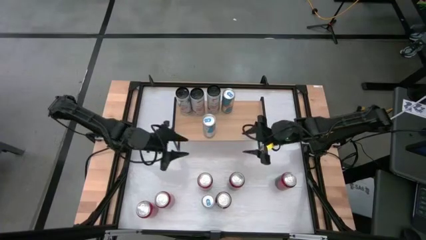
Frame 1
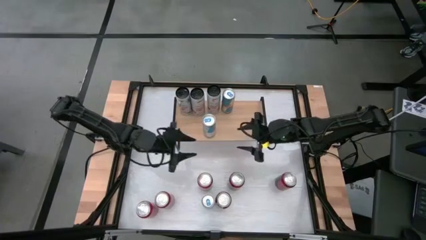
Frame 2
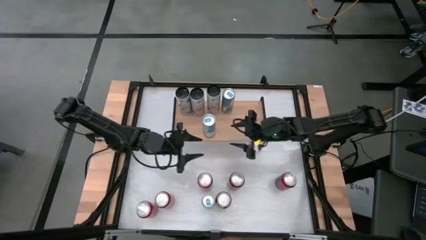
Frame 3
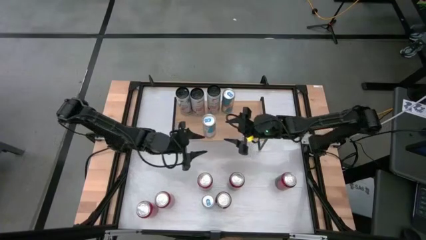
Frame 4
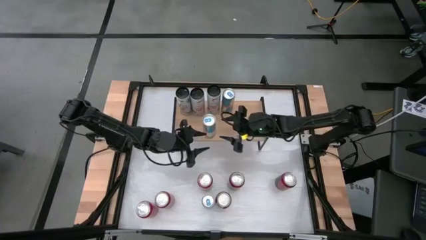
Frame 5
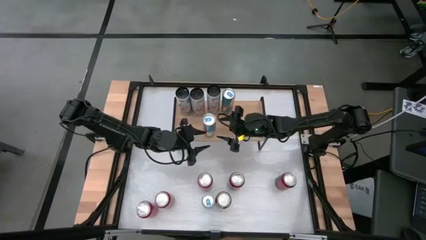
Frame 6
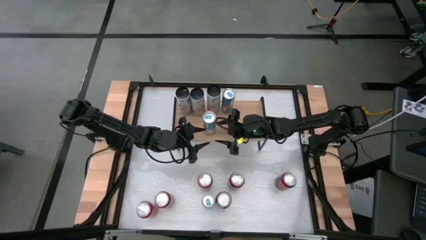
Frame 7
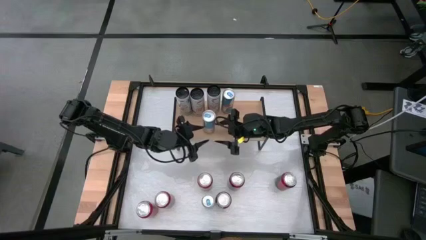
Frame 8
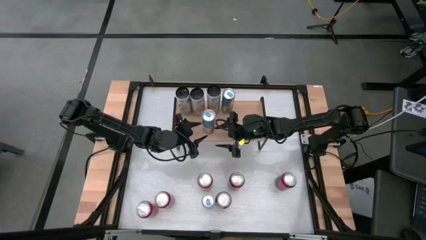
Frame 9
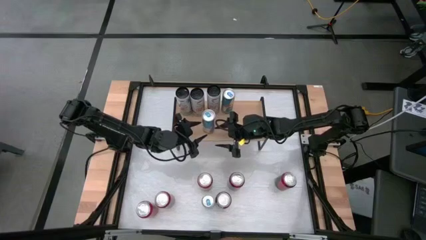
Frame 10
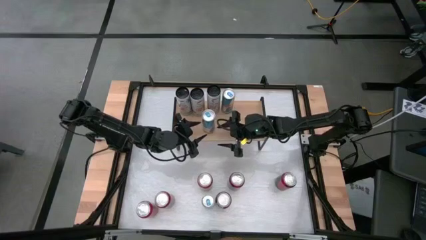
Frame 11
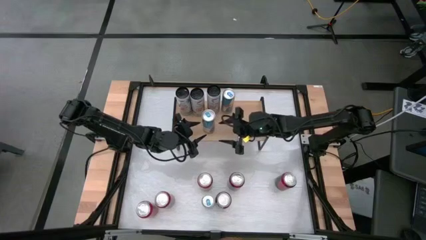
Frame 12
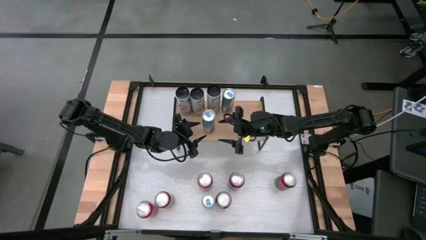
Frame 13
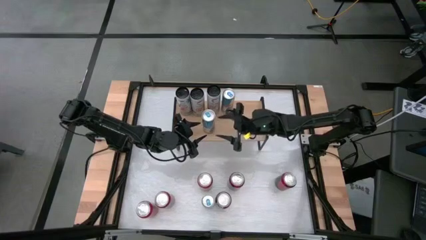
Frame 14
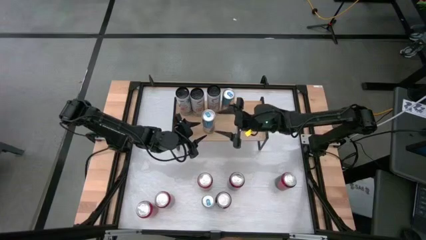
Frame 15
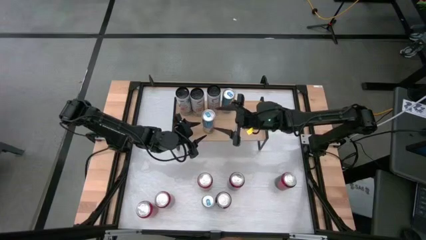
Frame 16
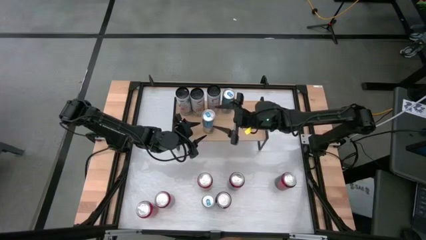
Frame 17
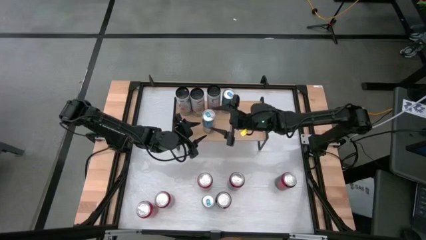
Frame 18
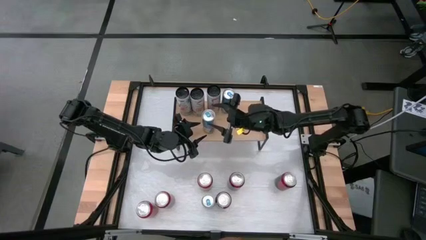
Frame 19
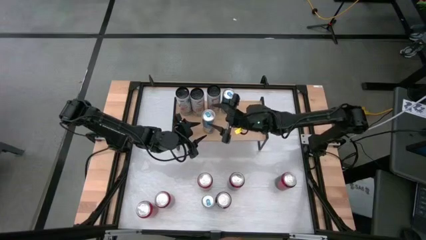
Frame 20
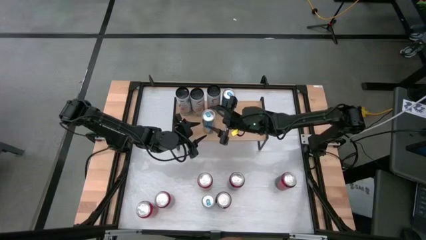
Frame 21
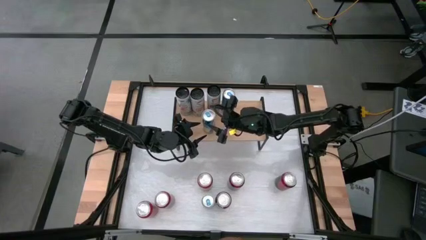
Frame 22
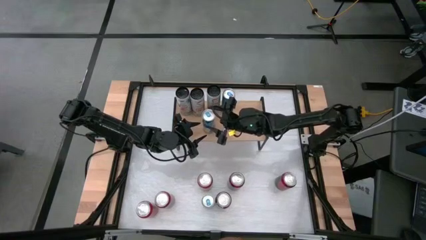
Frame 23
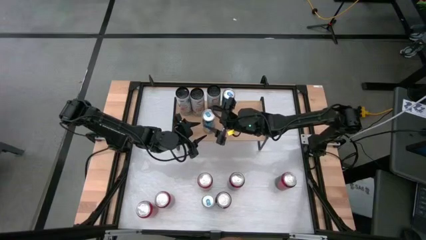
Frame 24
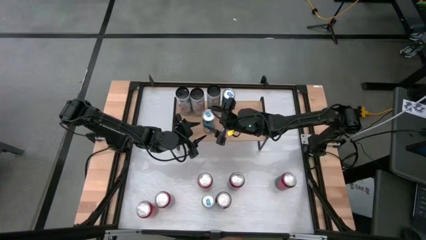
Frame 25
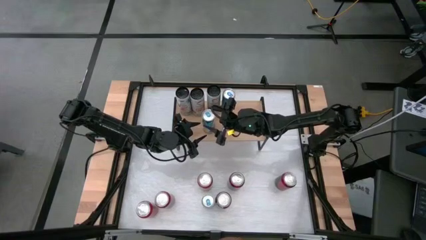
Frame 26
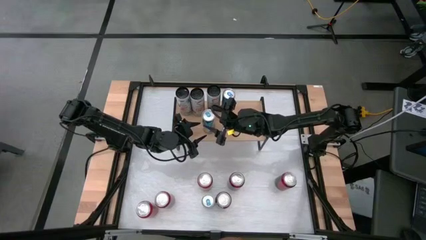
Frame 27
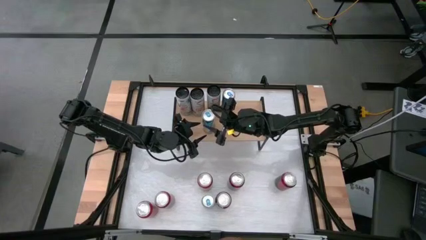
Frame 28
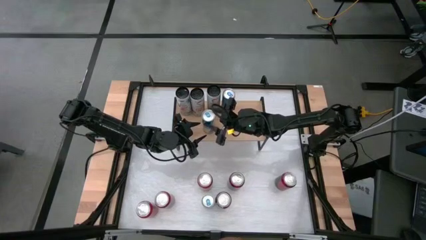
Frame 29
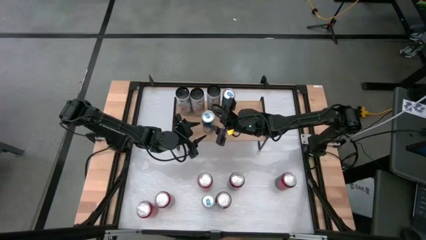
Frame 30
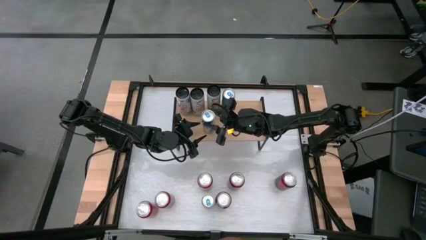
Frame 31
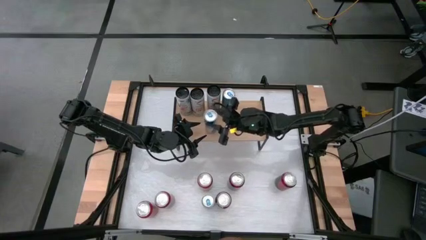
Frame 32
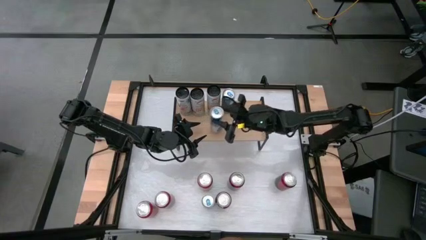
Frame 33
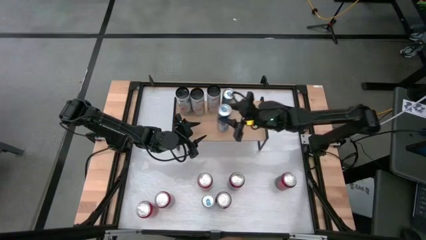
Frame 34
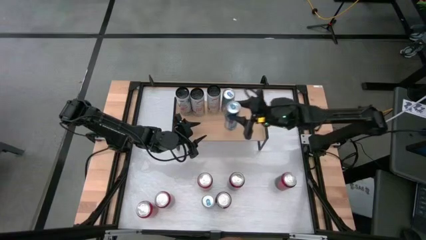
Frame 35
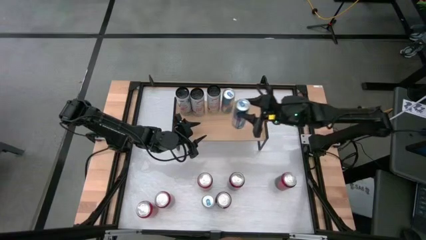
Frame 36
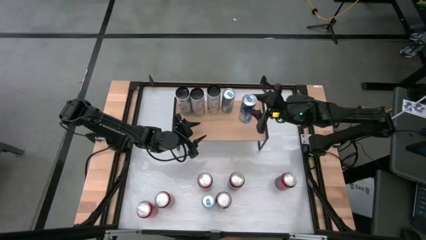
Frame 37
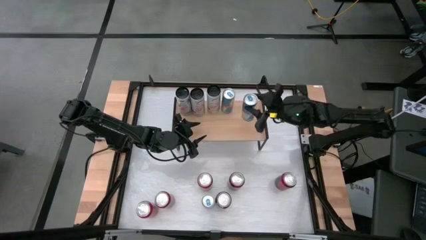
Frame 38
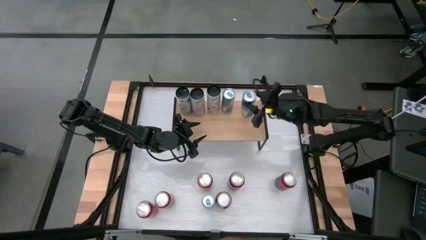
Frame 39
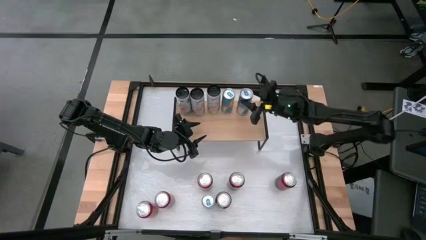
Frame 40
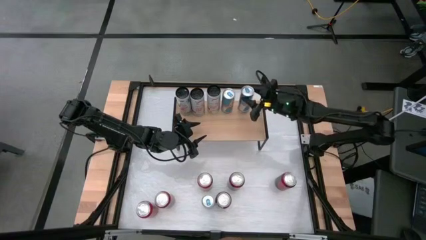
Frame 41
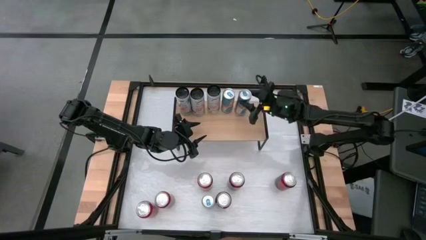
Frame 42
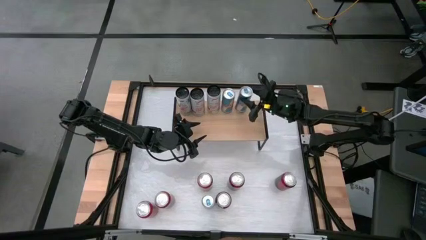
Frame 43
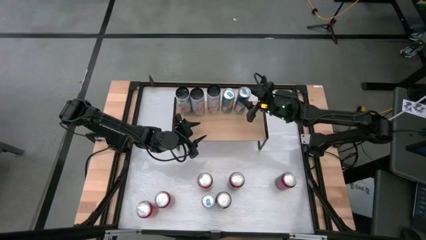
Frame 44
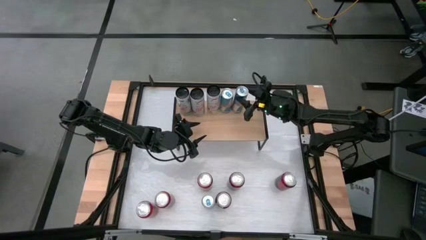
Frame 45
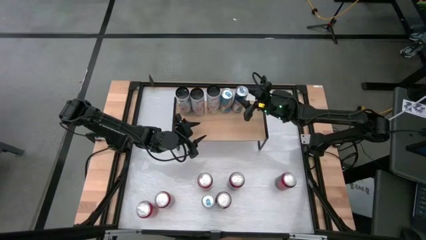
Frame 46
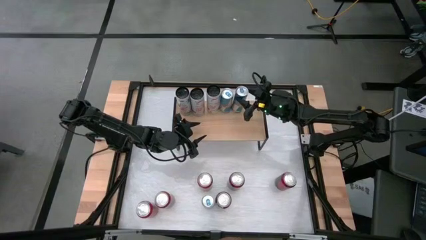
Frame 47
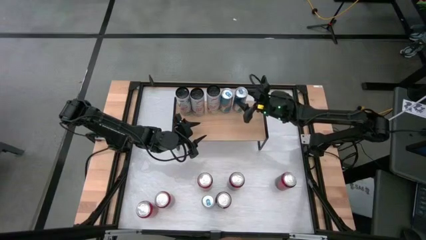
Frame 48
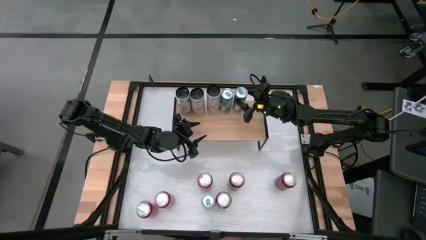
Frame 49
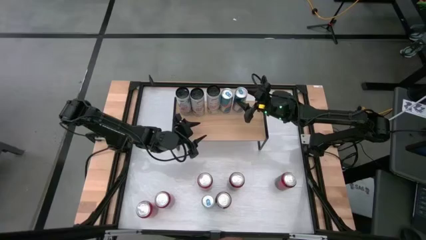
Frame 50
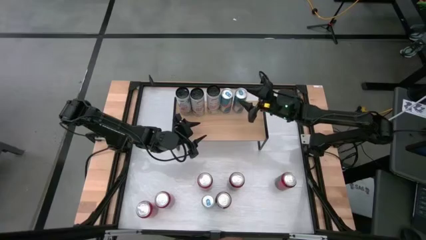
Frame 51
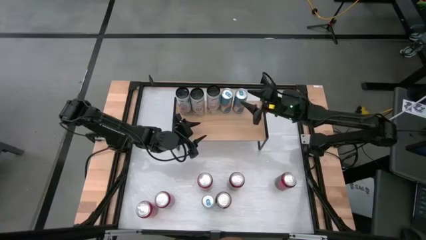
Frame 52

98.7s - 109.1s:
Task: Place canned beverage on shelf
Put the top blue soda can on the shelf

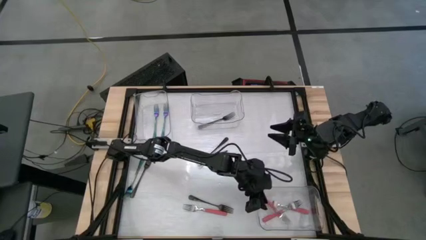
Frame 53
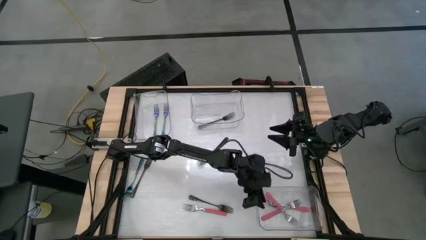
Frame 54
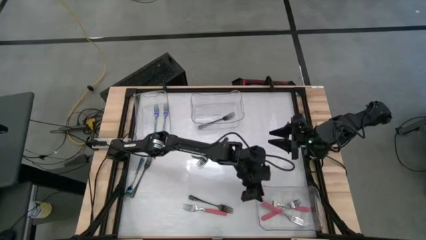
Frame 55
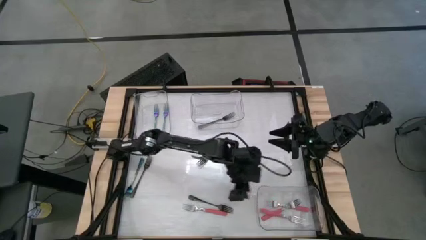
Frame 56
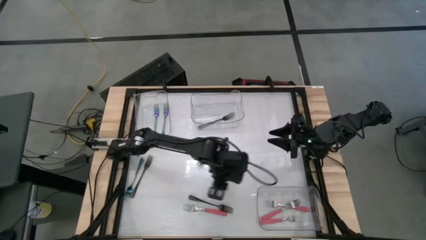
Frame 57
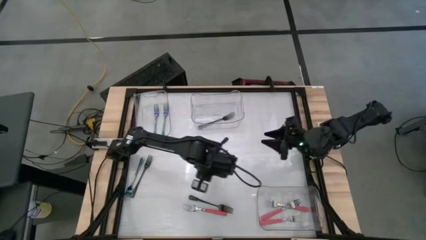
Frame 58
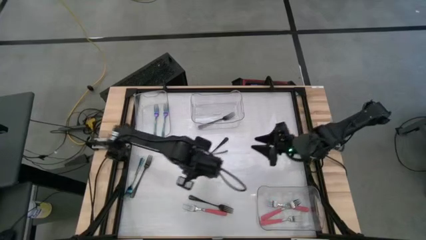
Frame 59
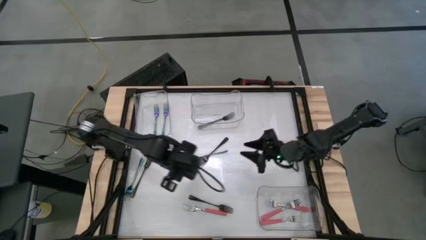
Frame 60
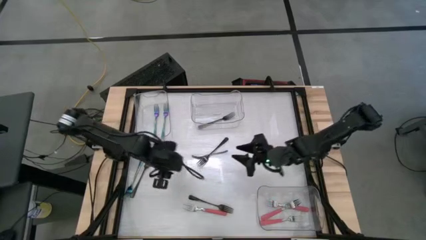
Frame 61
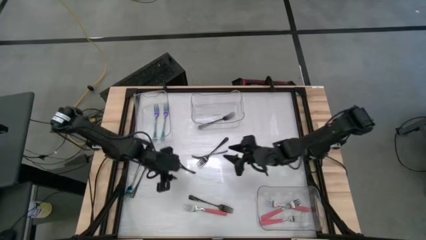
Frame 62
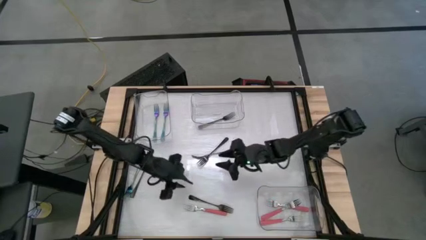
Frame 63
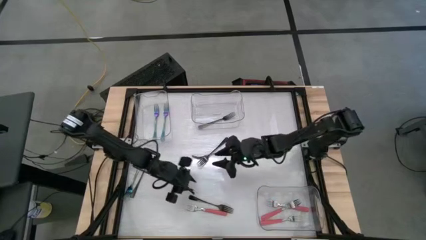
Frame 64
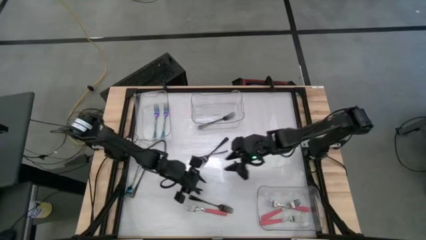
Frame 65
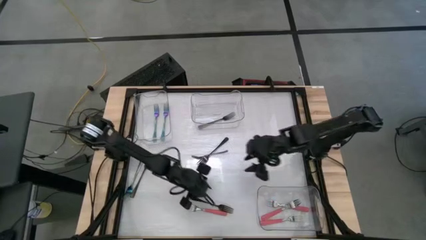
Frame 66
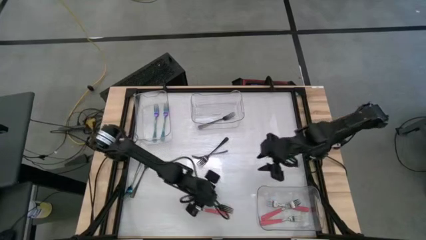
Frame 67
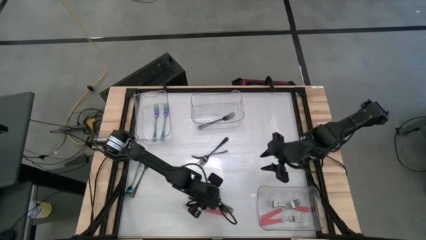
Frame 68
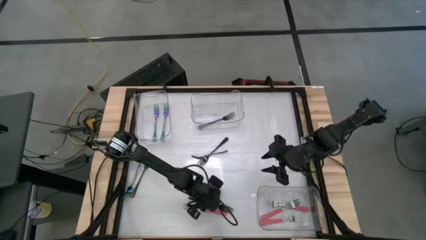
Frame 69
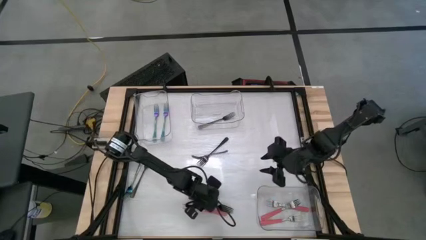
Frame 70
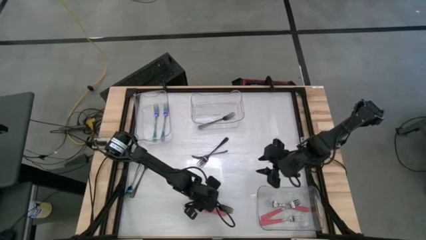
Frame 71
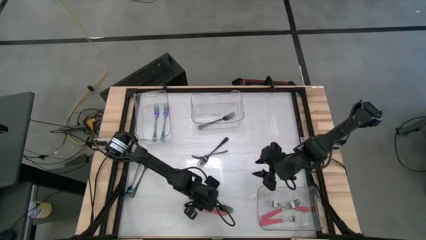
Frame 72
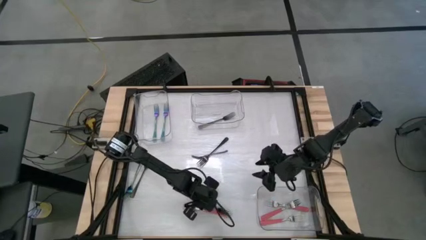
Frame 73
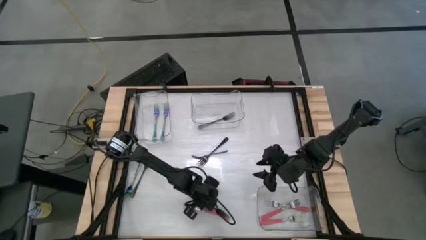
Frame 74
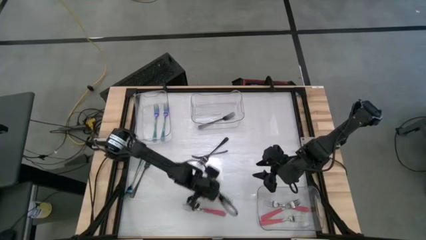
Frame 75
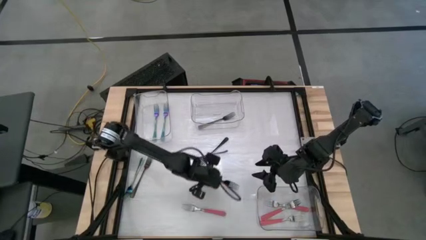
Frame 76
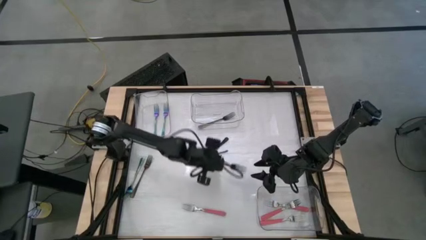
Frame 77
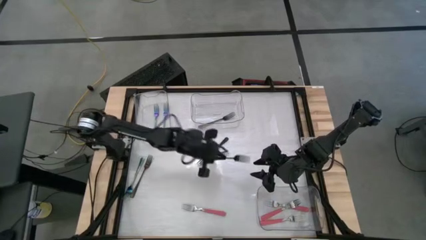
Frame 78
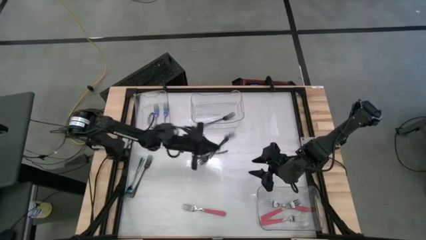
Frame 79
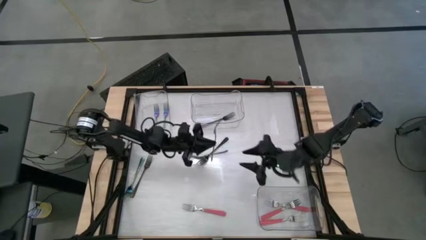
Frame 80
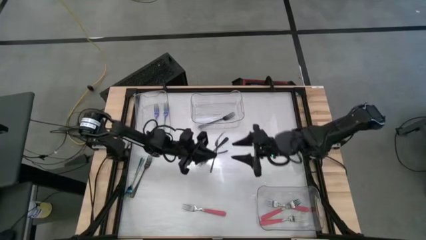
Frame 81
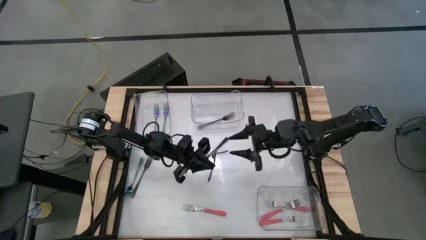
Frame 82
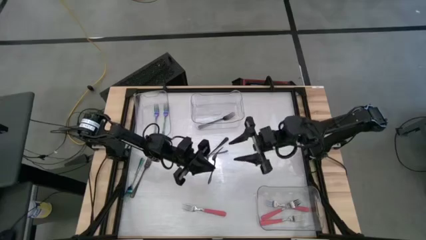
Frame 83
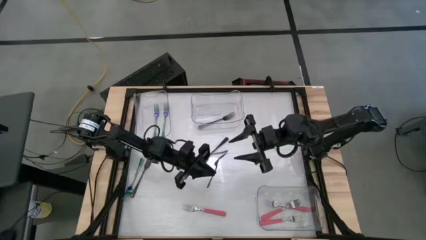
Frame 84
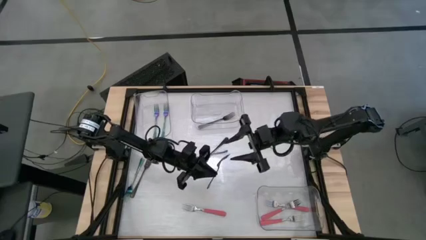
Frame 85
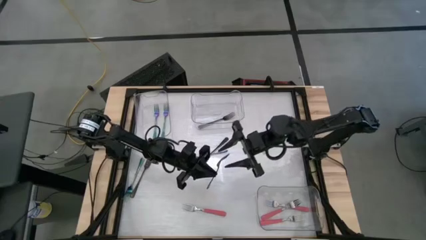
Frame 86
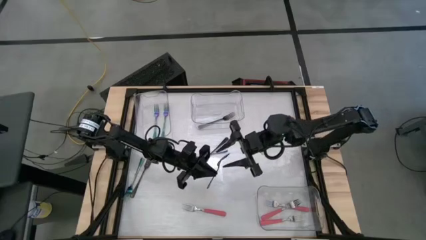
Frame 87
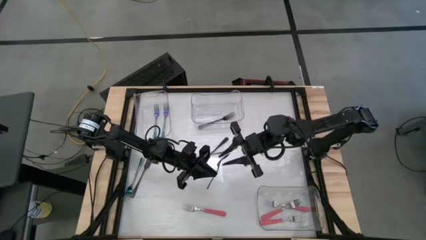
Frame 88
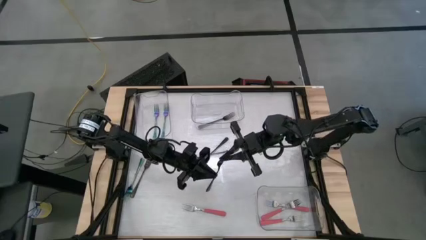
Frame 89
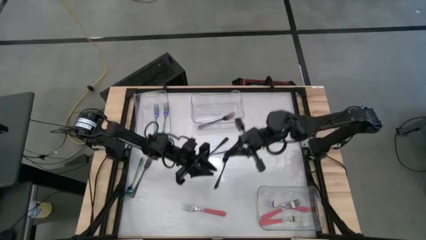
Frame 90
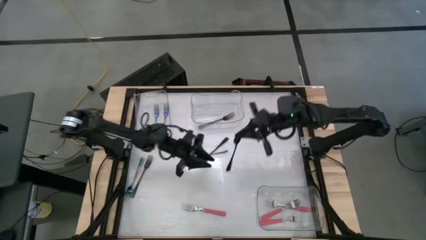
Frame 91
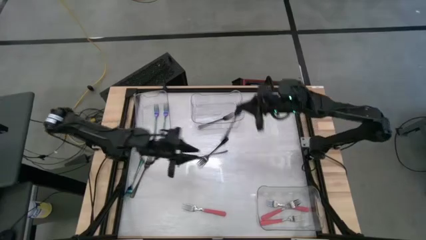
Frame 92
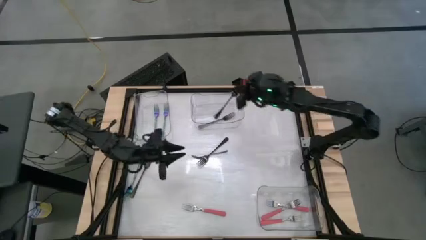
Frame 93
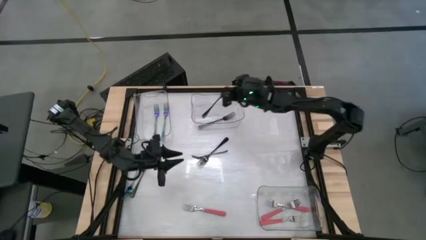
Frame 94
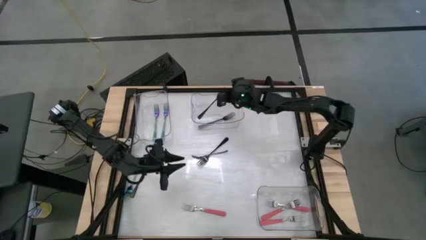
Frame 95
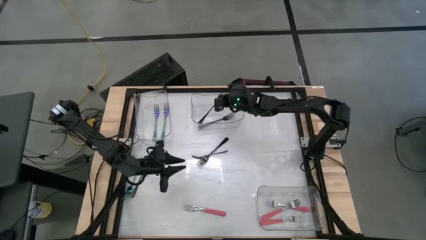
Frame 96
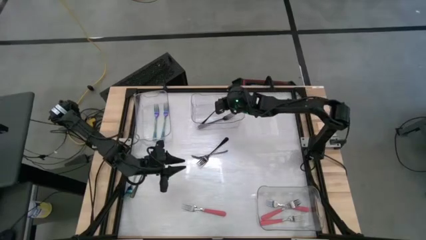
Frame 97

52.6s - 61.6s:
Task: Sort silverware by color (type)
Put the black fork into the top right transparent bin
